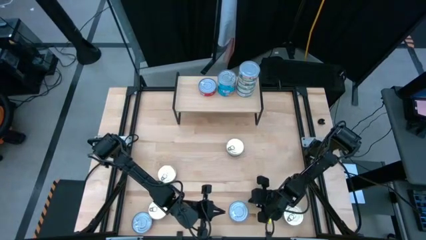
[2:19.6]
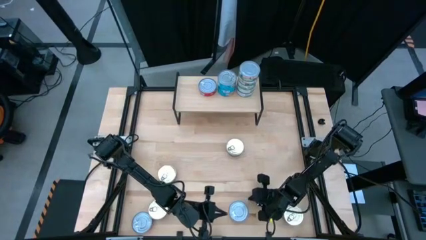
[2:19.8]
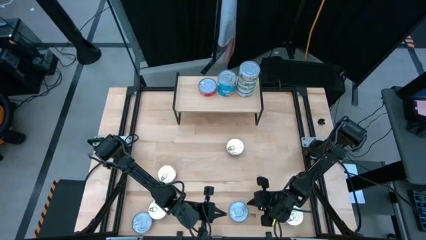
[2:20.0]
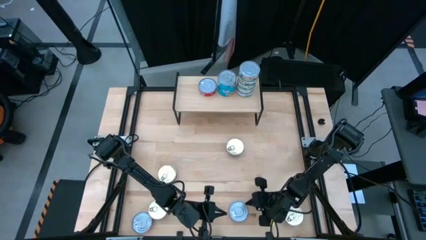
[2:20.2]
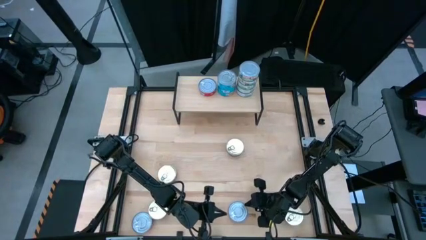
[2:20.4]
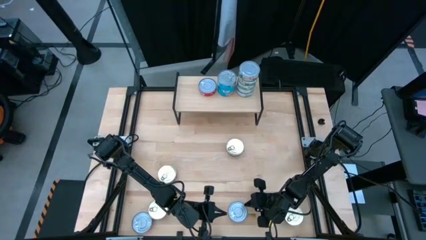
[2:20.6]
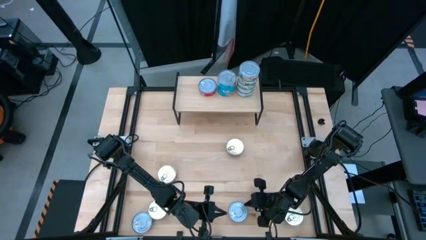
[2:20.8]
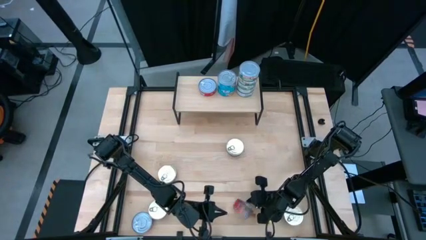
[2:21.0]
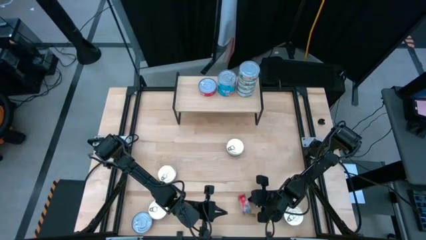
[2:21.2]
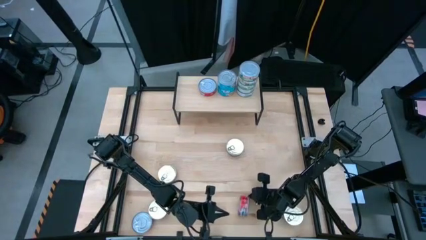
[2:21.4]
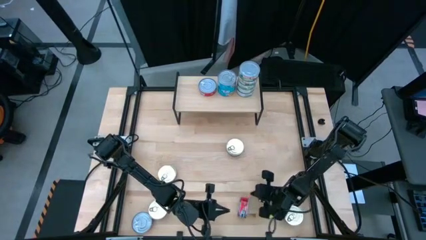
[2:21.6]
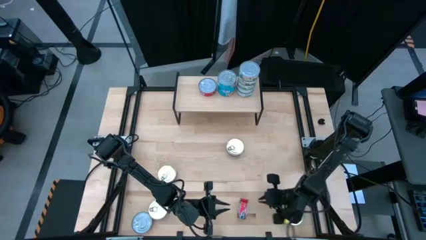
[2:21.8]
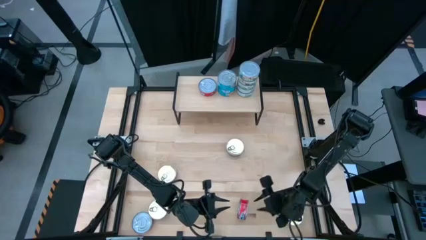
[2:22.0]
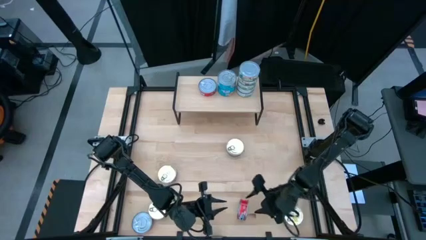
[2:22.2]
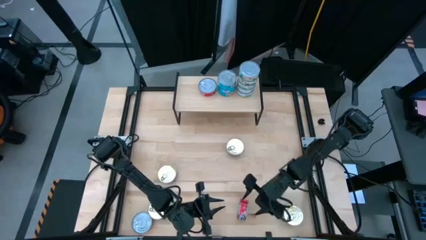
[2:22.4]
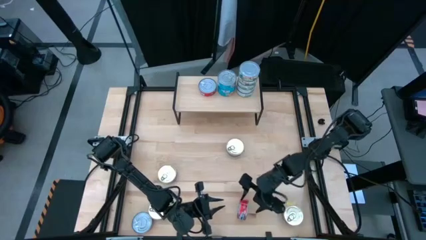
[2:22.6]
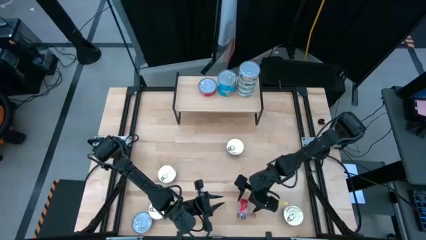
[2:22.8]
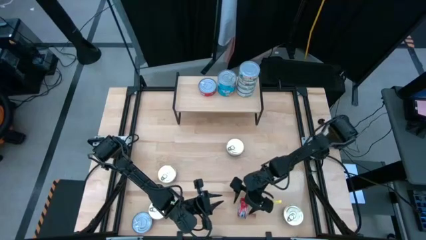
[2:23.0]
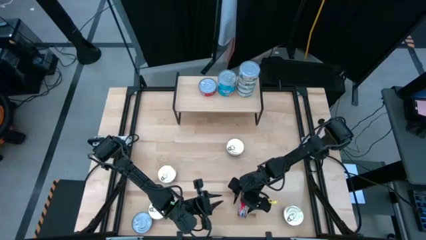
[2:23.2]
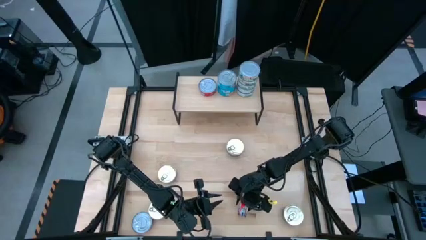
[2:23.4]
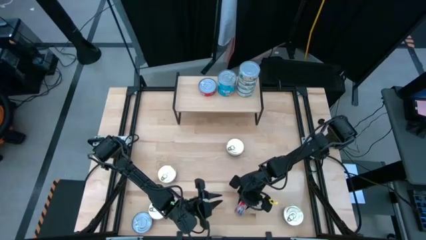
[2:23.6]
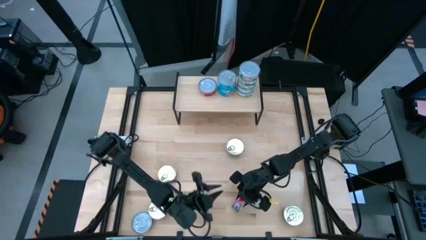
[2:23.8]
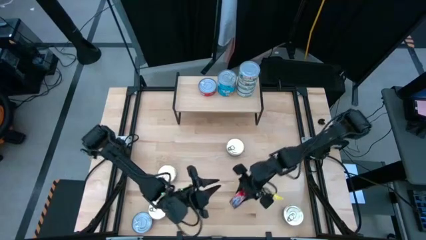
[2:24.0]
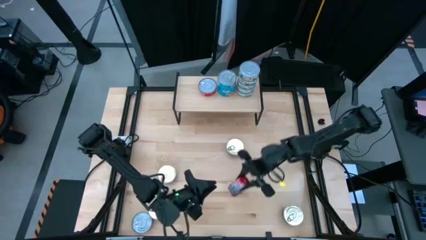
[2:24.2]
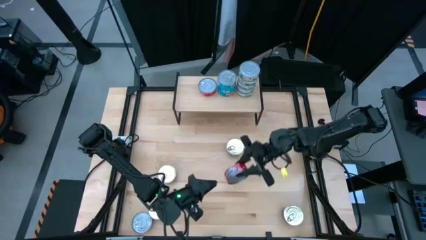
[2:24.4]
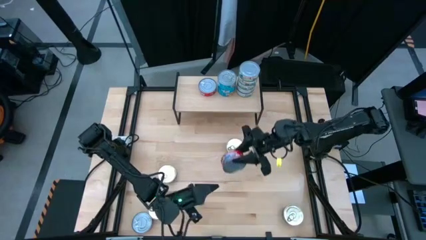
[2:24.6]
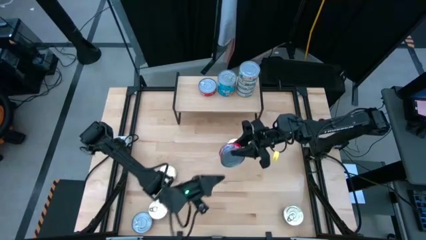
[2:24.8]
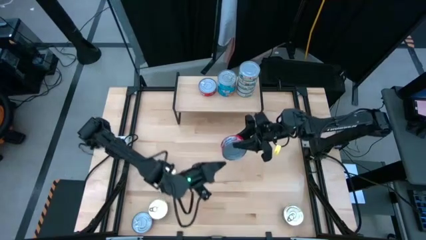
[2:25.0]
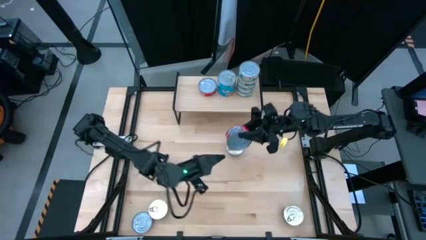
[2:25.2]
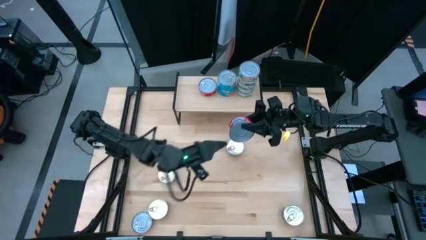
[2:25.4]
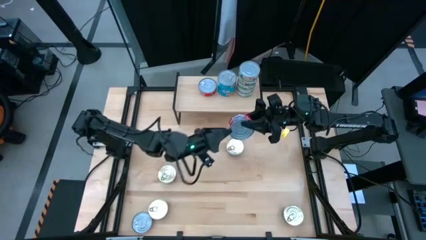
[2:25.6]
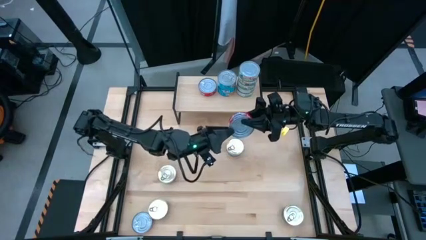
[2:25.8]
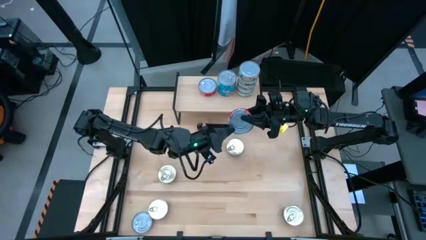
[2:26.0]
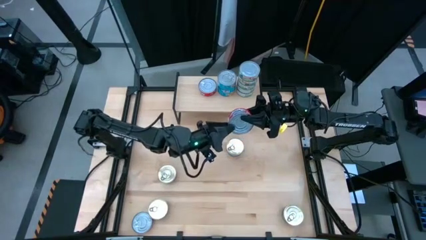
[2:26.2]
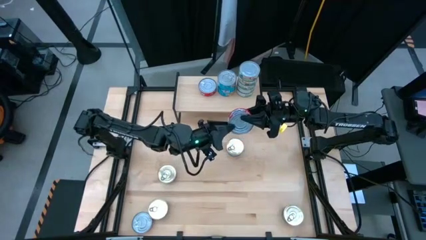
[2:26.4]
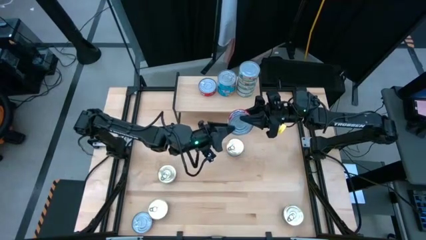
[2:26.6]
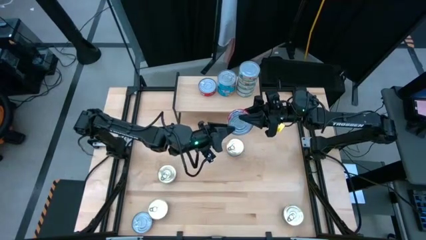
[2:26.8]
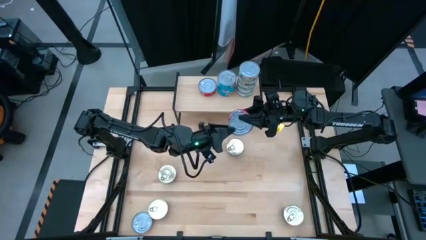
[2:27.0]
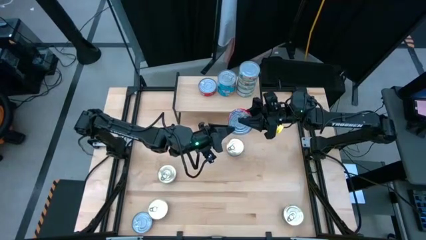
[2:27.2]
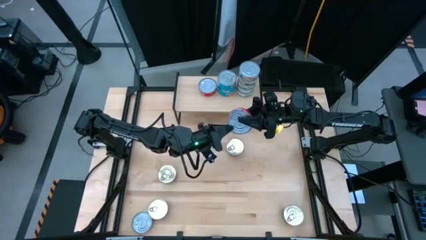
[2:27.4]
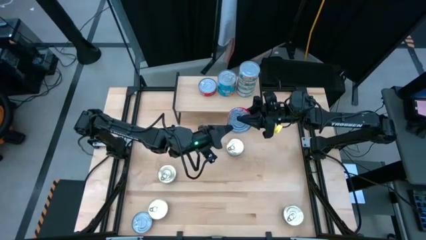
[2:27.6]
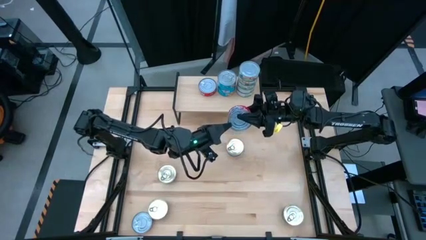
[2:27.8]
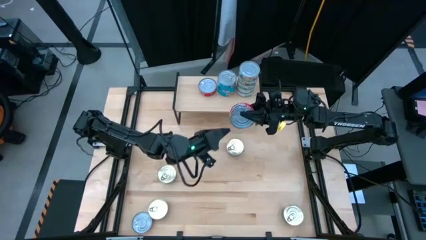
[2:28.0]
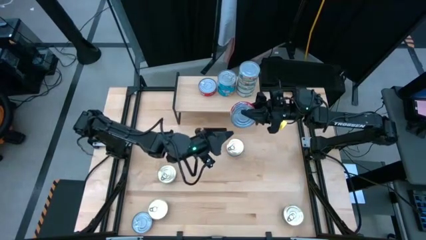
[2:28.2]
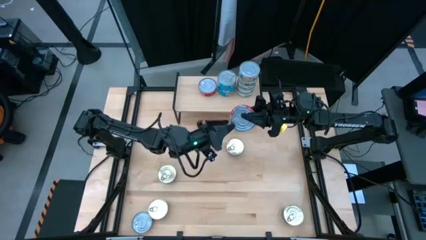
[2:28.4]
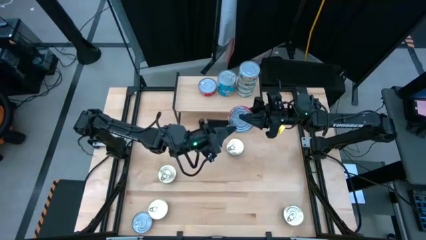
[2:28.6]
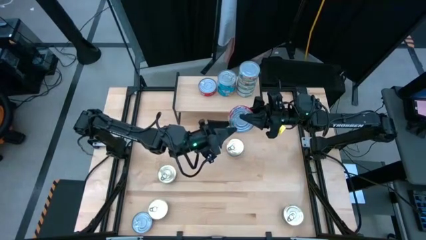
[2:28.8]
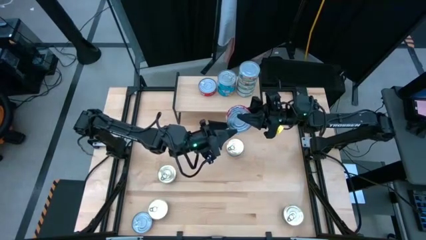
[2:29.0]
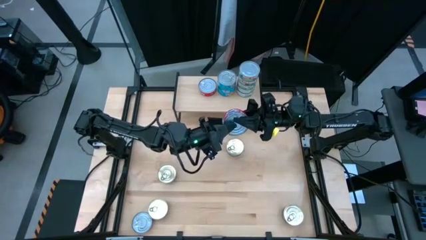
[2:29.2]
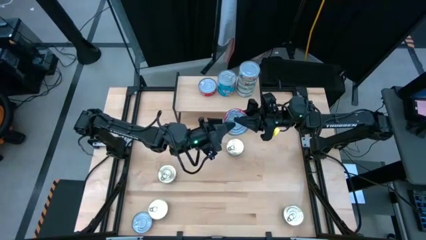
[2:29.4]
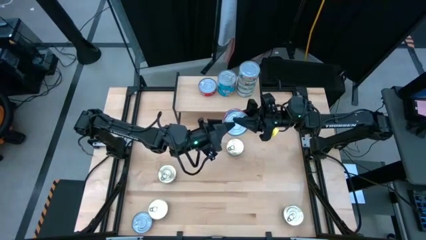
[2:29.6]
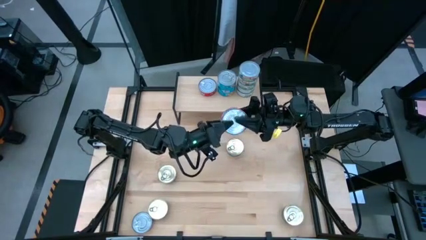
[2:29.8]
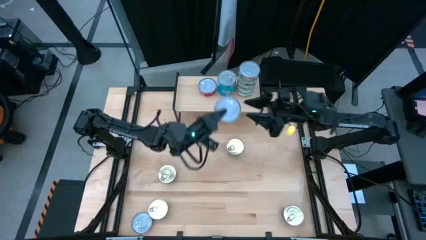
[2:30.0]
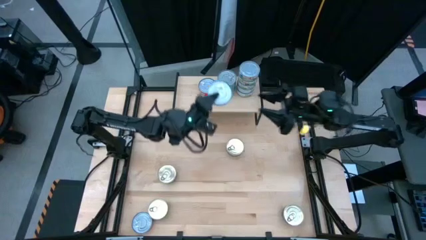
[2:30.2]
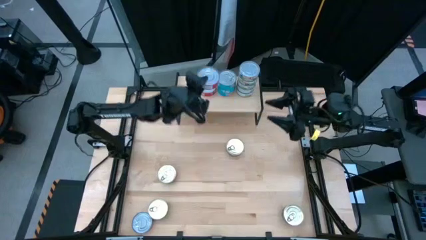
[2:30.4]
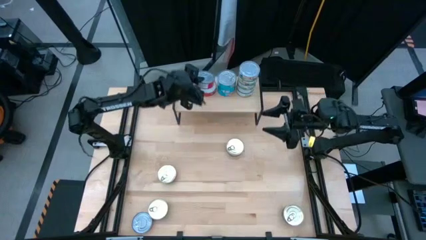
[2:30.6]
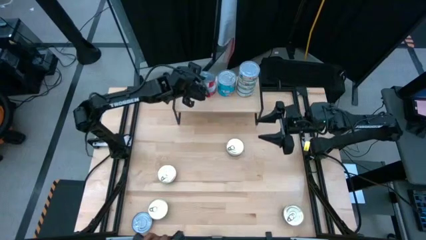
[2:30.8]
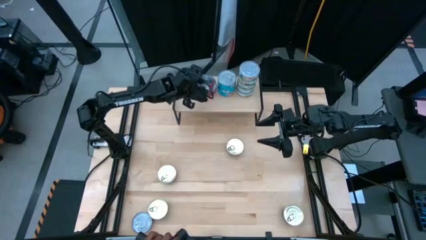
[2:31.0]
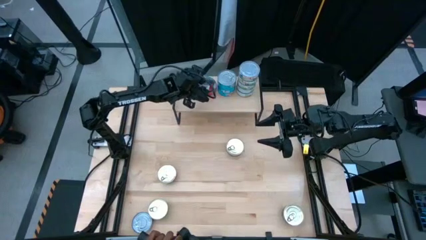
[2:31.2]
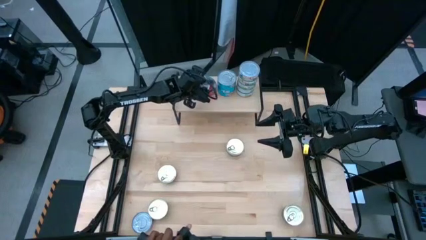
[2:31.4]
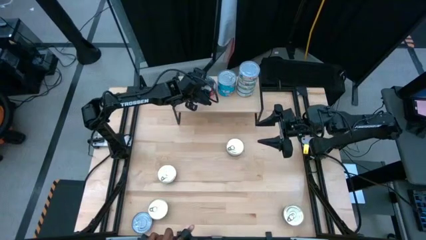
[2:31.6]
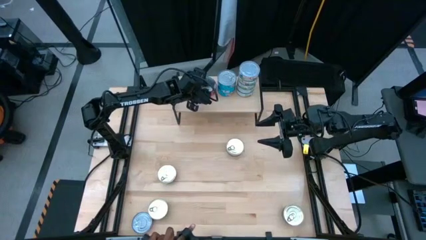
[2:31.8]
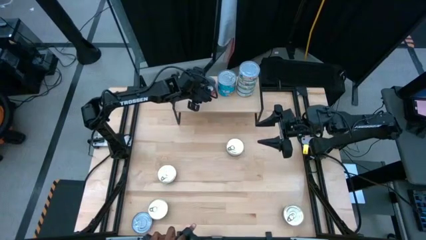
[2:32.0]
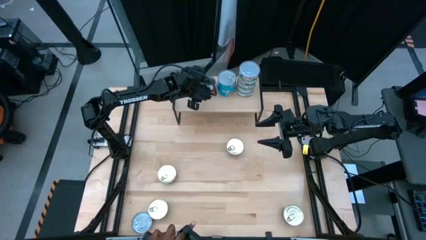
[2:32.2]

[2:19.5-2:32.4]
Task: Stack canned seafood by type on shelf
Stack the red tuna can on top of the other red tuna can on the shelf

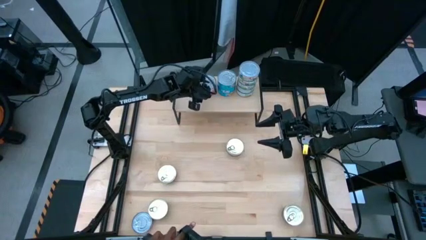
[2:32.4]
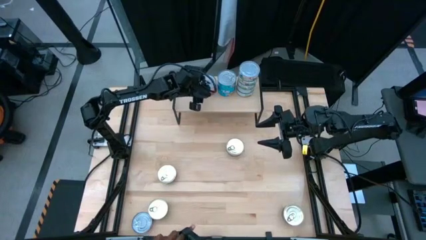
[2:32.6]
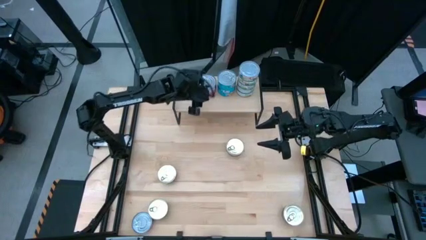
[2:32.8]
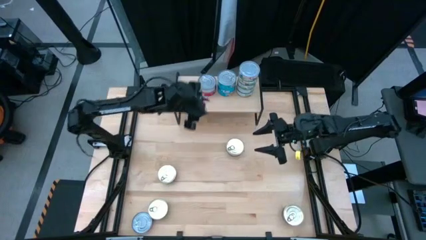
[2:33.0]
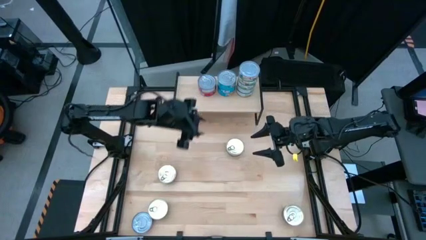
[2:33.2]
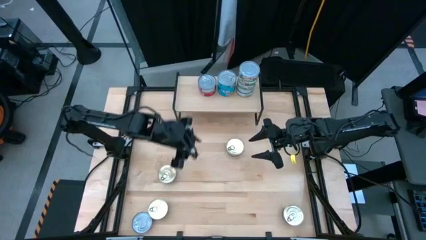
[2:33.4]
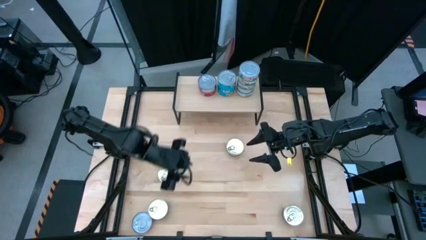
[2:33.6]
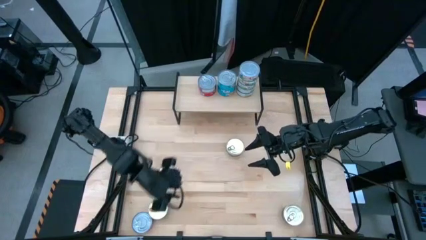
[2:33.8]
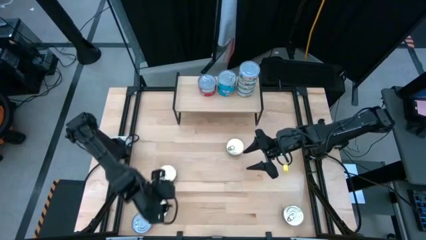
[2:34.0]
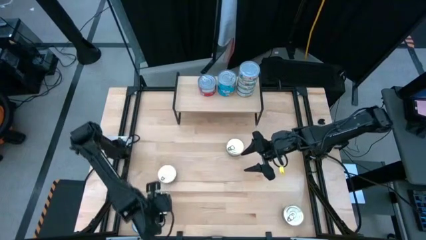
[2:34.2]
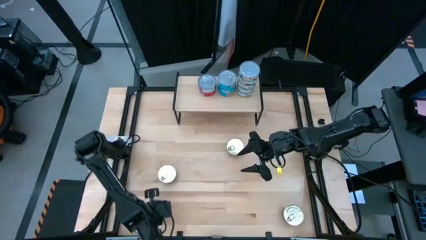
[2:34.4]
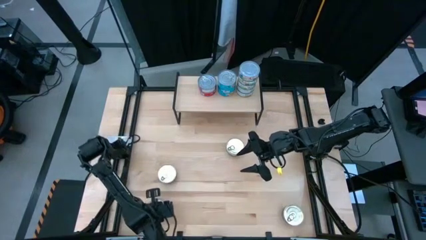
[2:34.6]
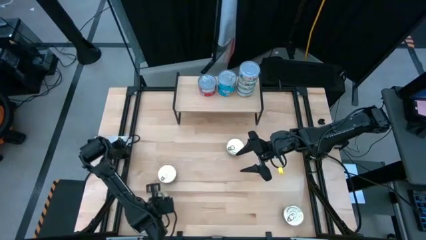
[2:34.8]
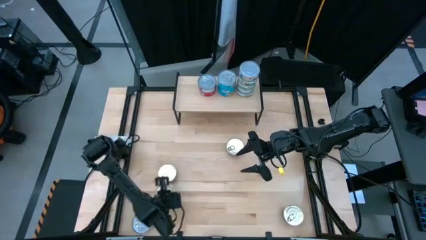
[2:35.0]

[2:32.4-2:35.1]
Adjust the blue pink tuna can
